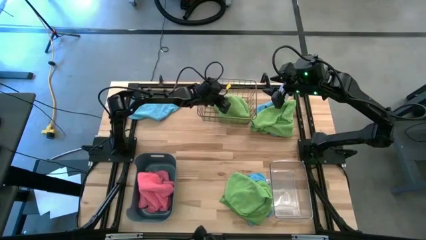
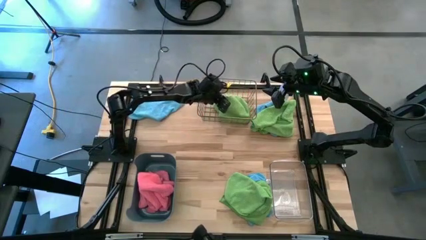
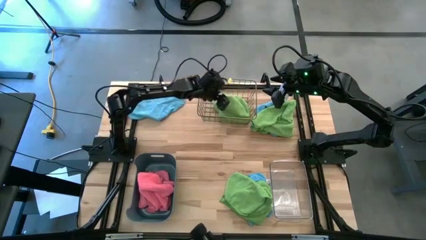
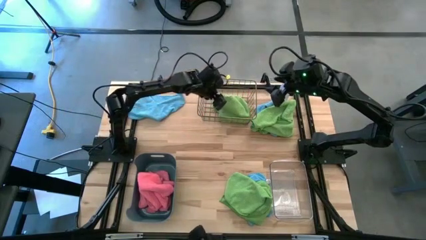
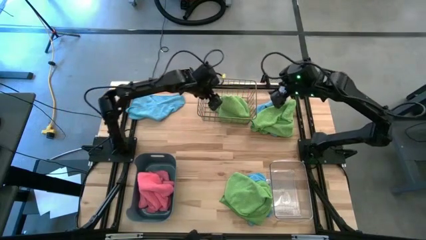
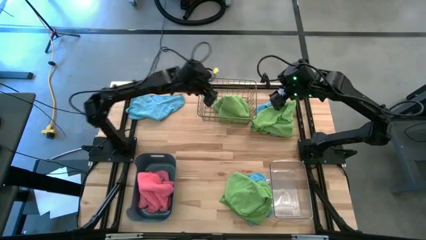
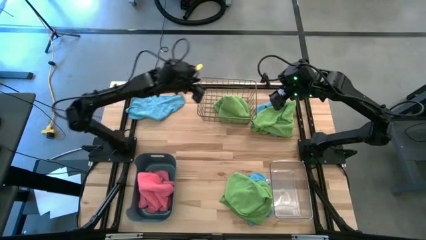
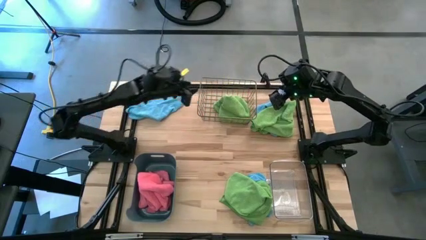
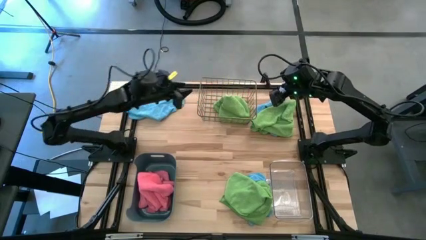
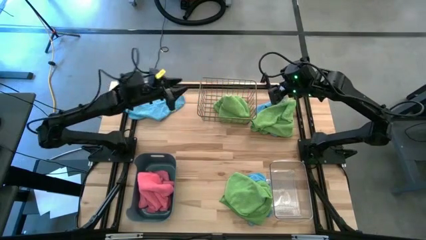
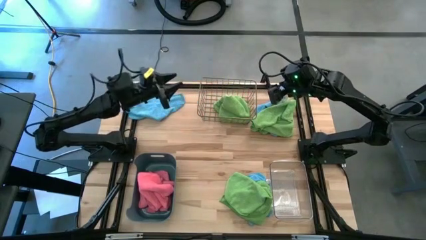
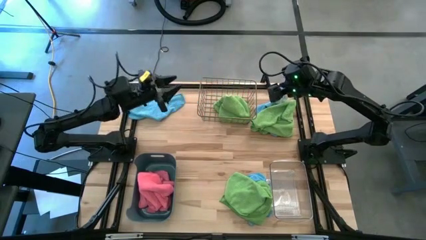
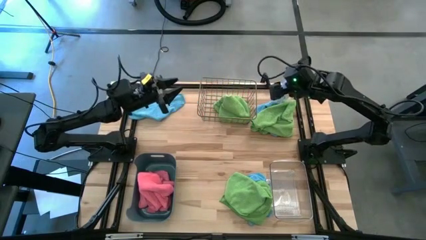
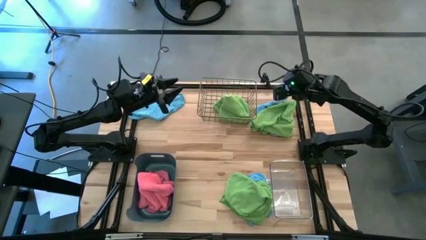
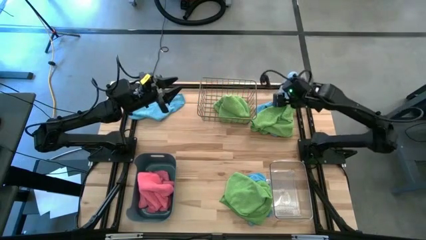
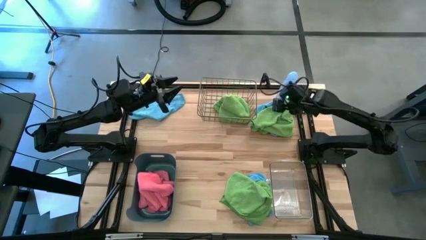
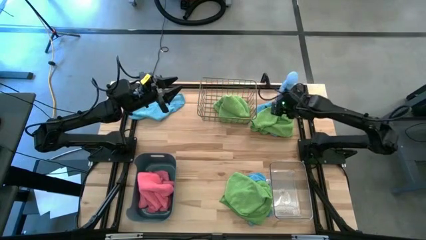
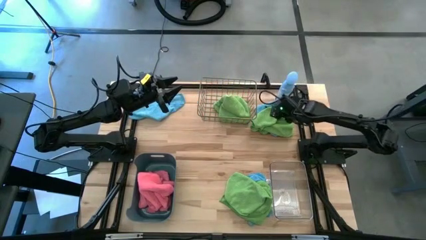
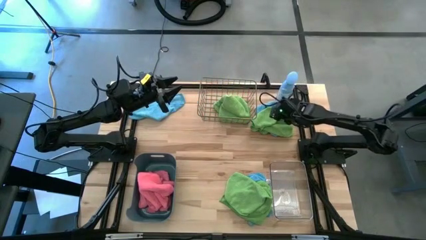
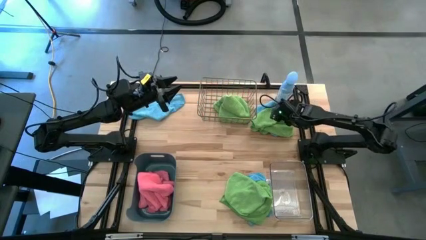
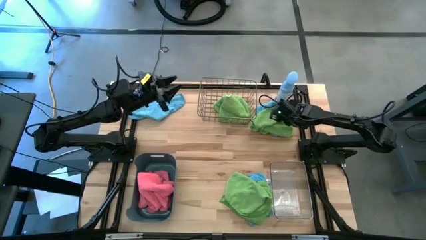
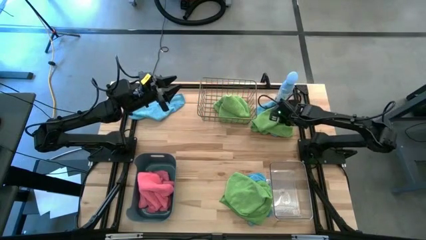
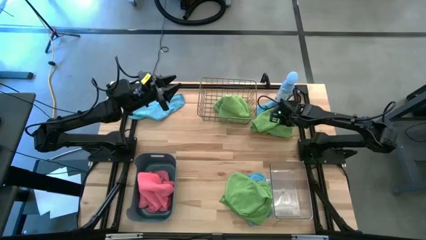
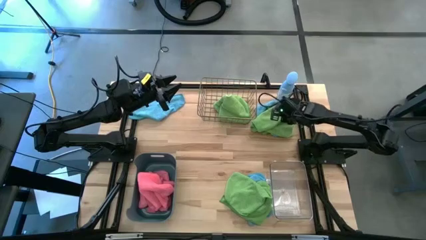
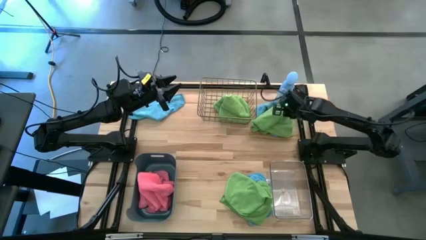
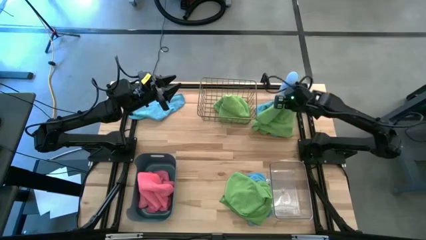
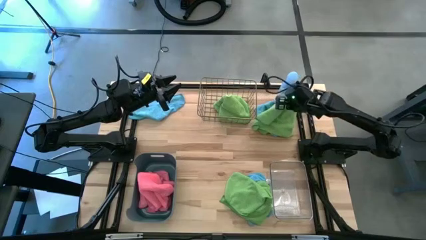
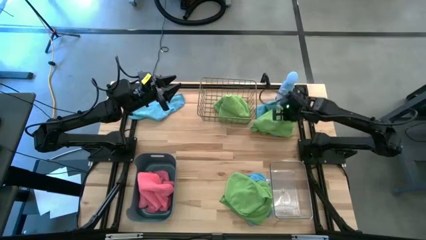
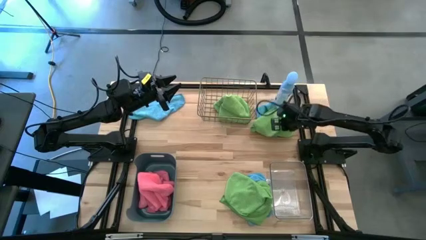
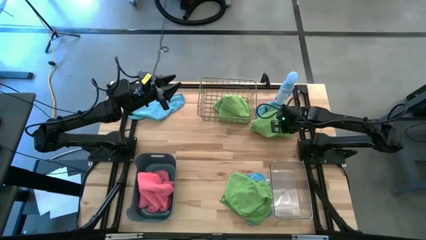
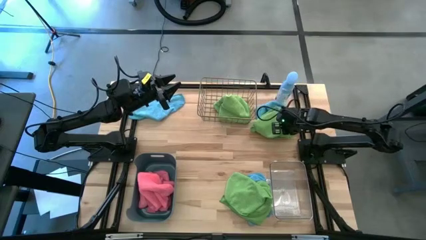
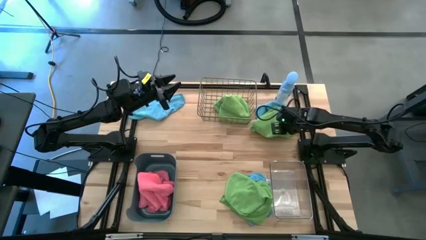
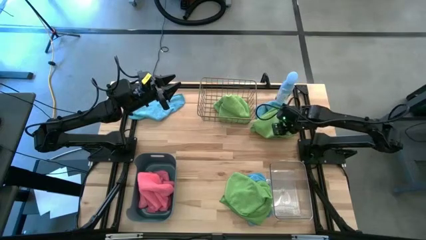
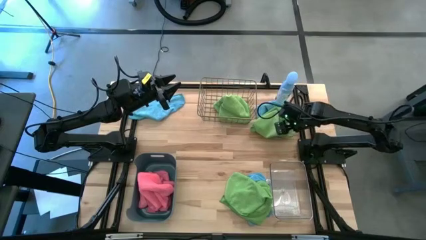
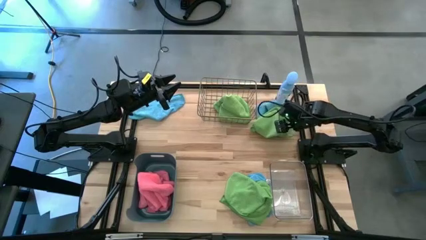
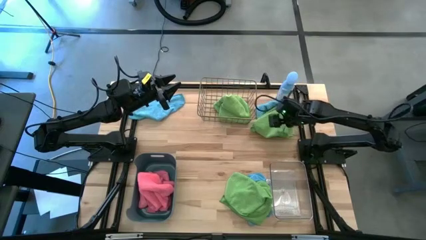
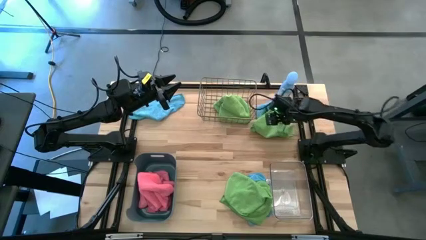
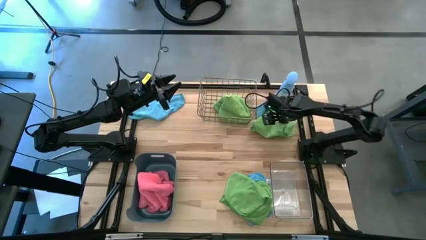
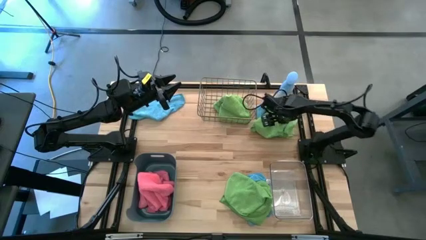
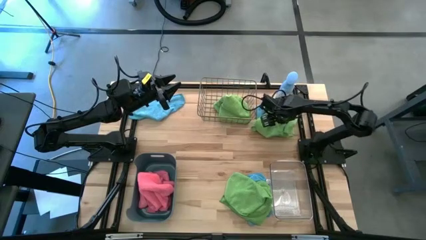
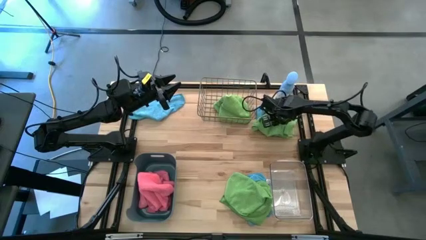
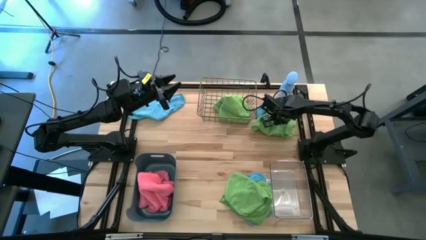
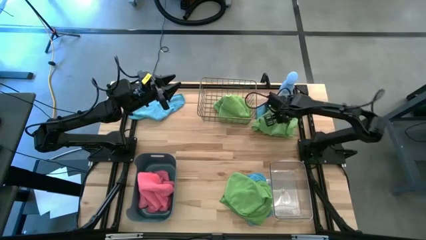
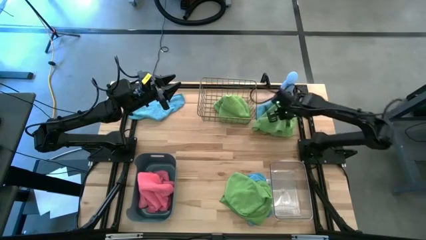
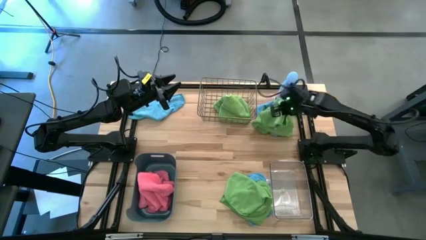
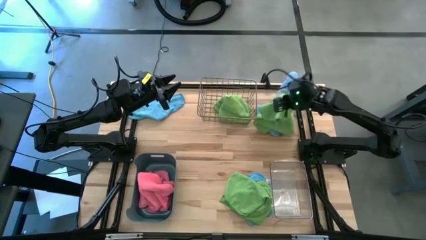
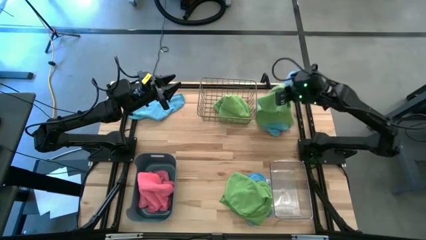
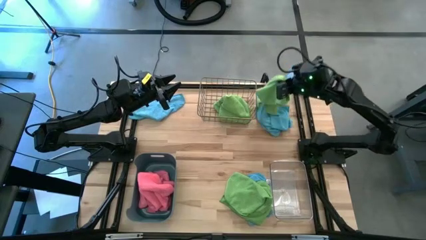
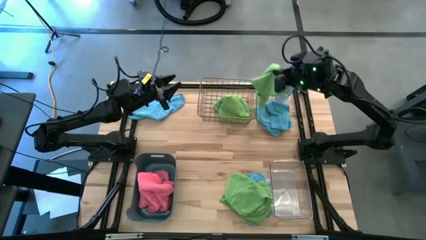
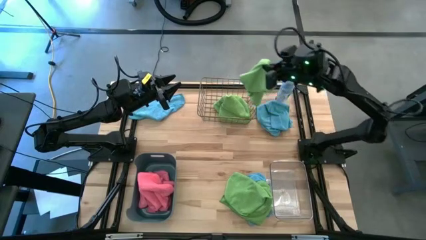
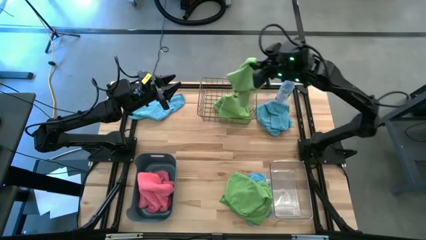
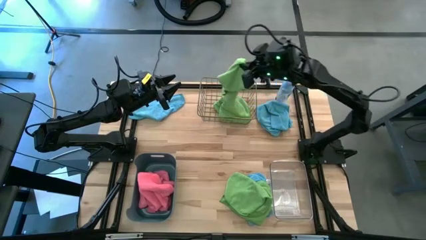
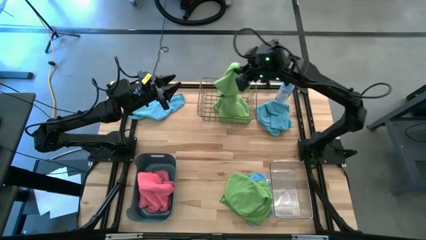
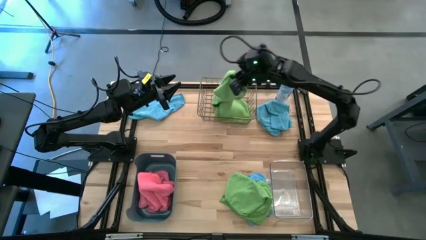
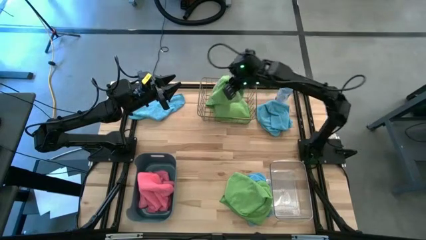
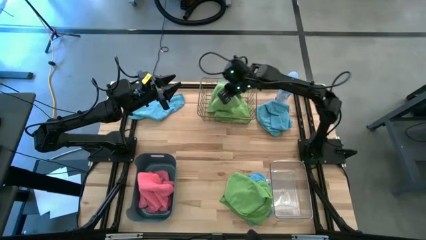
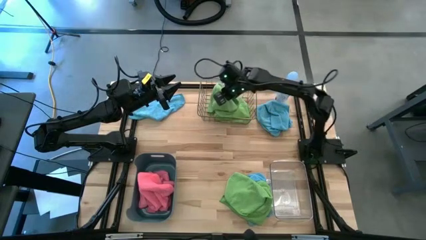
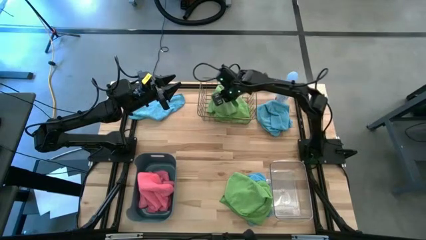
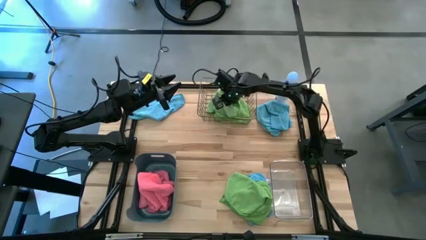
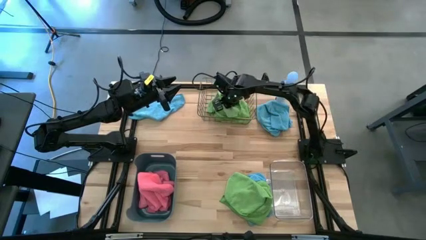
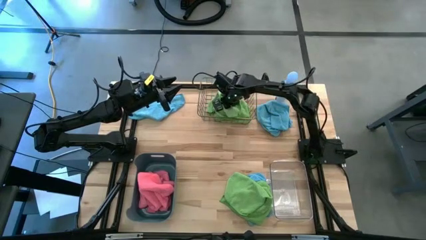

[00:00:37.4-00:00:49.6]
Task: Sort microfiber towel by color & place in baskets
Put the top green towel into the wire basket

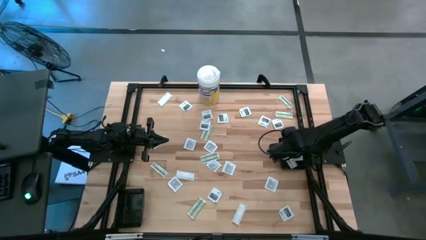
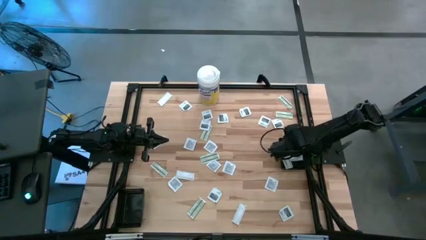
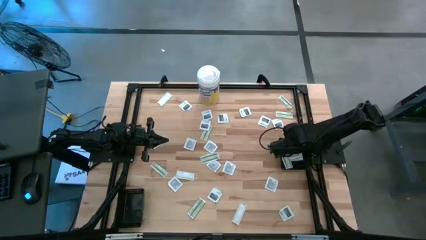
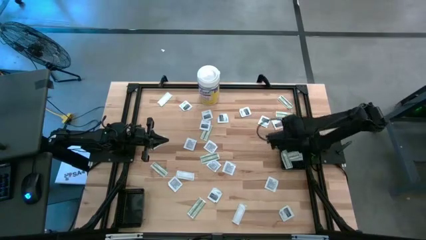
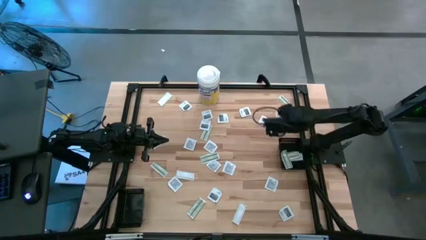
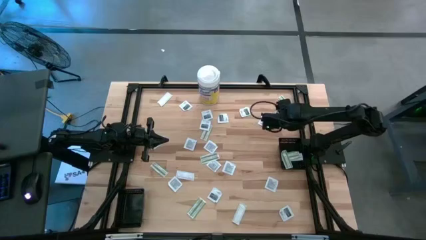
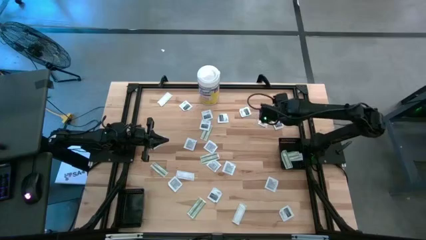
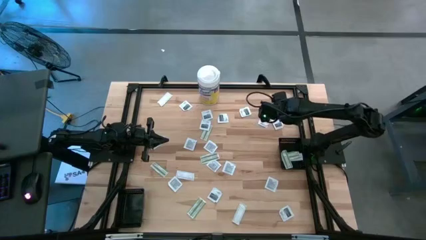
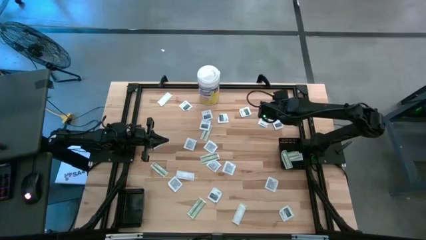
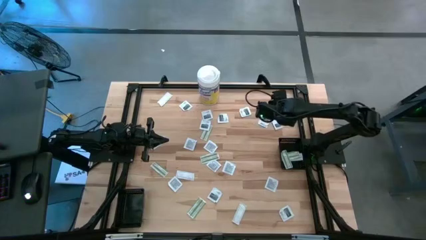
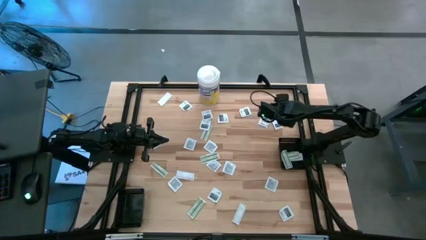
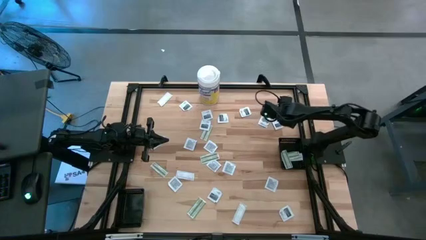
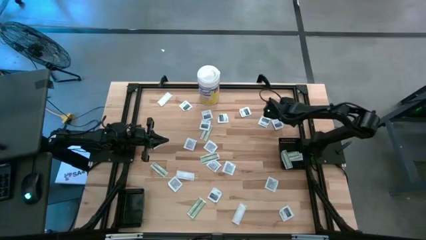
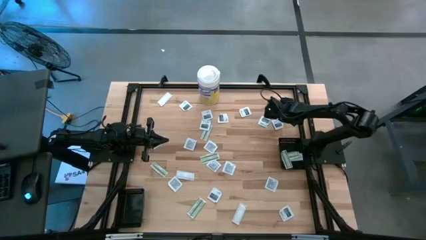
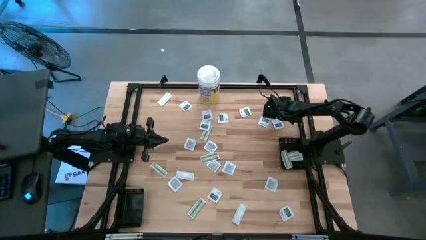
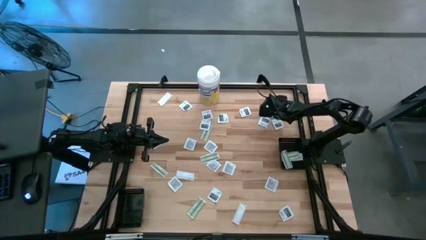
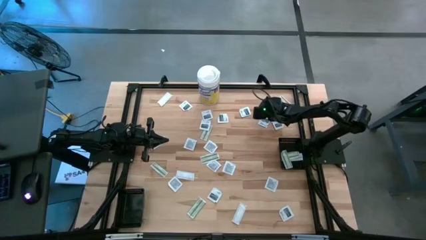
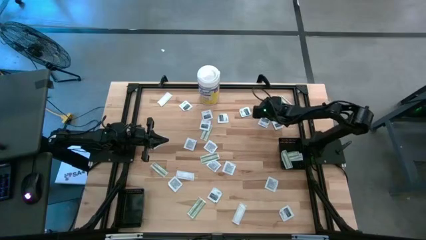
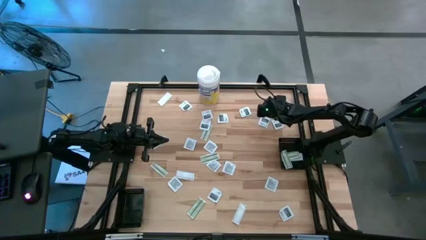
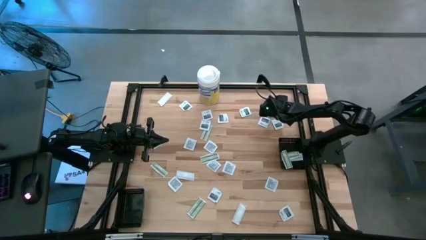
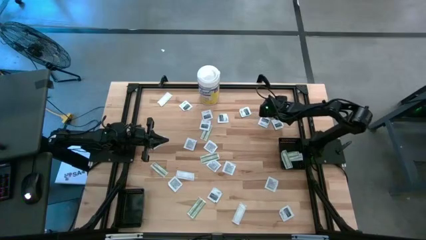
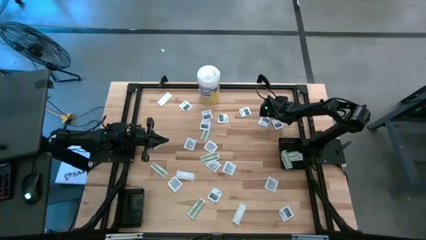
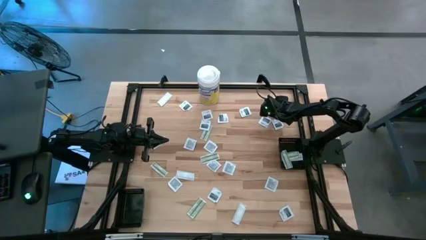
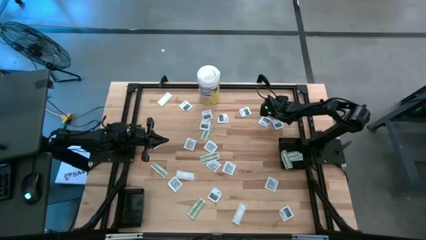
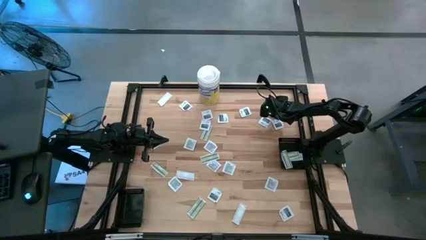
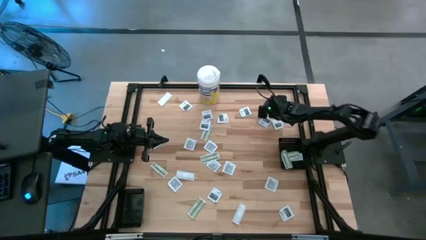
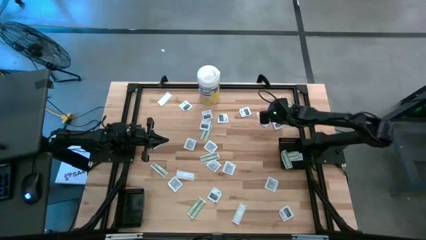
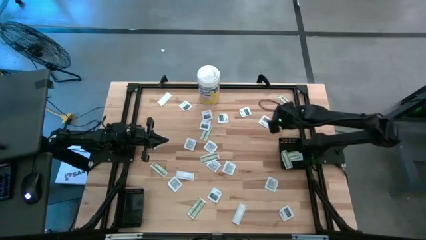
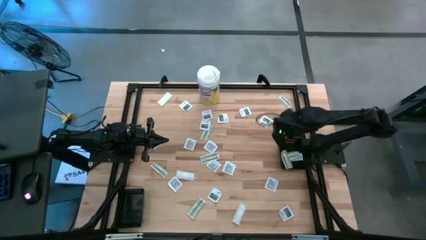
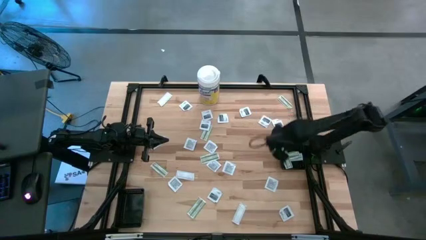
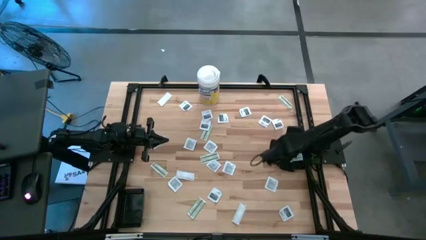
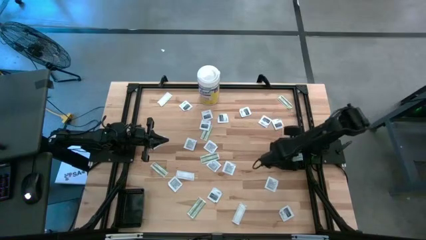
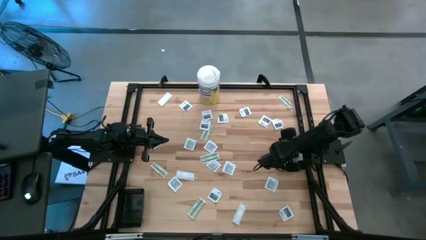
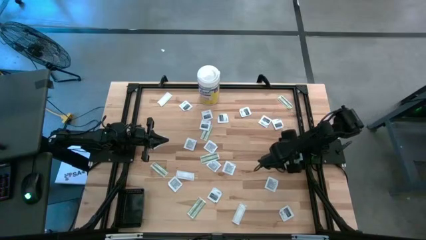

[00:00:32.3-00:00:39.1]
Task: Pick & Place First Aid Supplies
Put the white bandage pad into the right black bin
